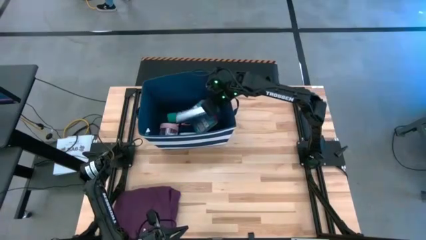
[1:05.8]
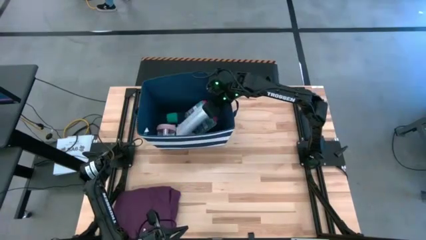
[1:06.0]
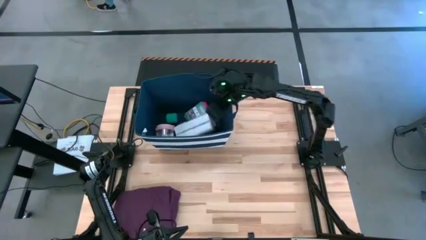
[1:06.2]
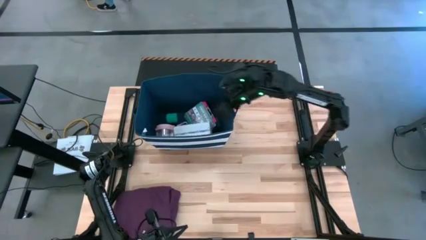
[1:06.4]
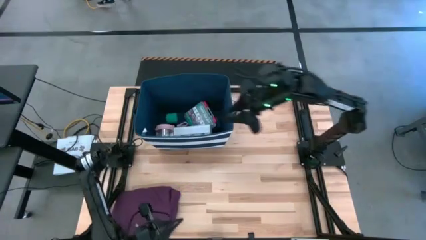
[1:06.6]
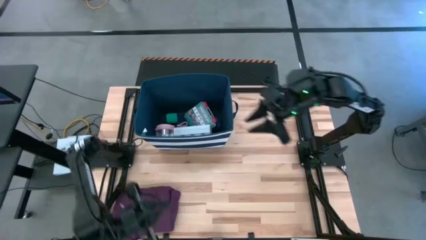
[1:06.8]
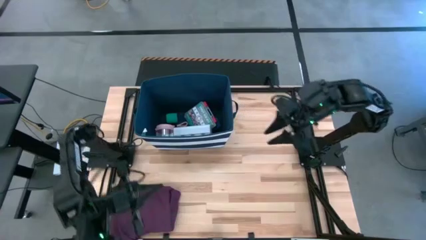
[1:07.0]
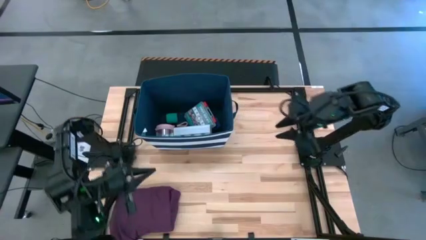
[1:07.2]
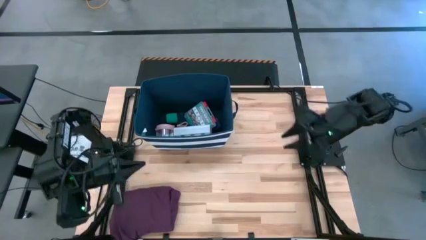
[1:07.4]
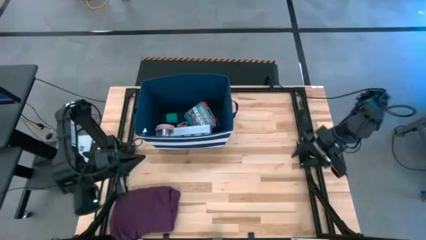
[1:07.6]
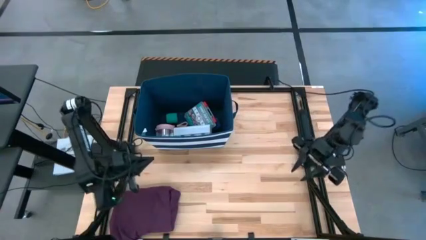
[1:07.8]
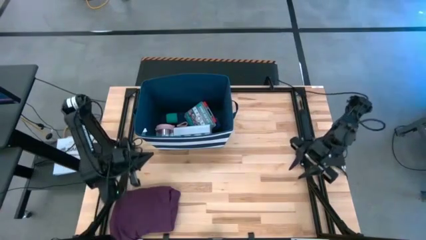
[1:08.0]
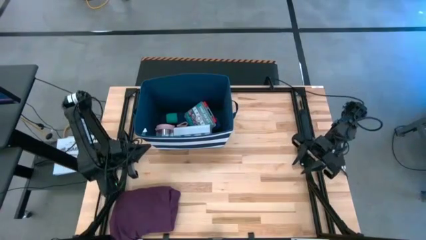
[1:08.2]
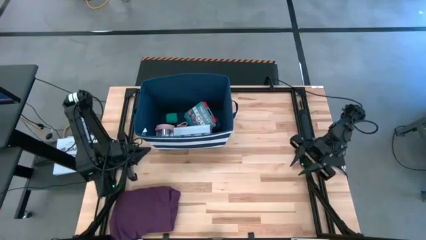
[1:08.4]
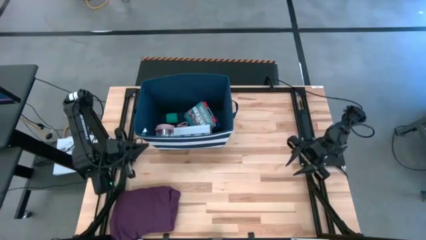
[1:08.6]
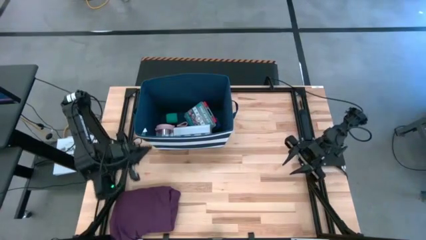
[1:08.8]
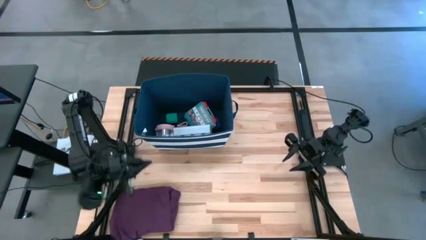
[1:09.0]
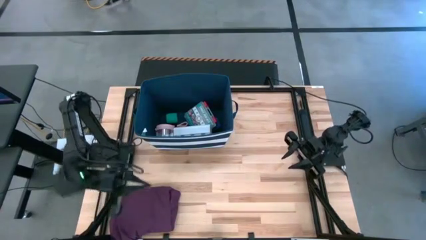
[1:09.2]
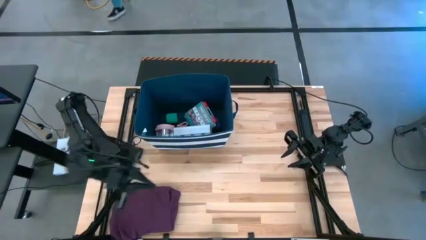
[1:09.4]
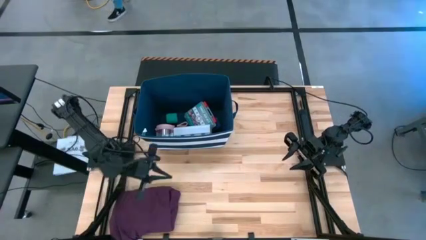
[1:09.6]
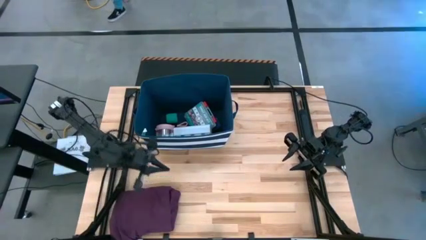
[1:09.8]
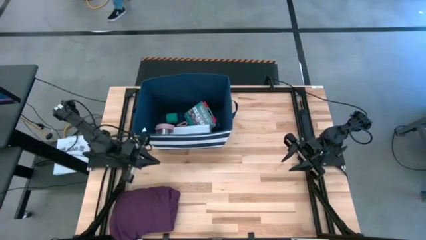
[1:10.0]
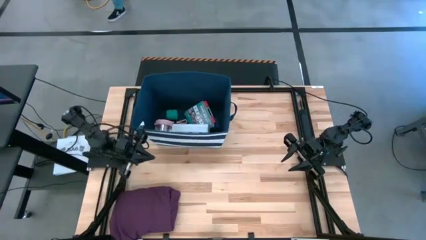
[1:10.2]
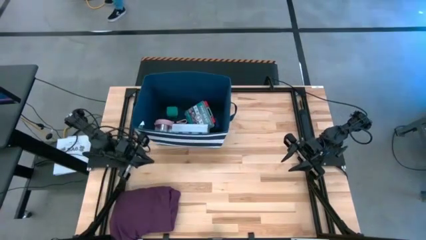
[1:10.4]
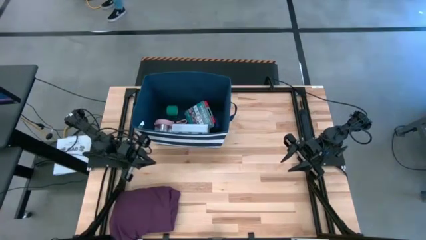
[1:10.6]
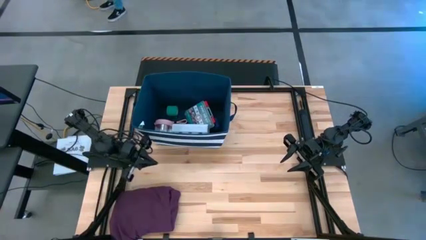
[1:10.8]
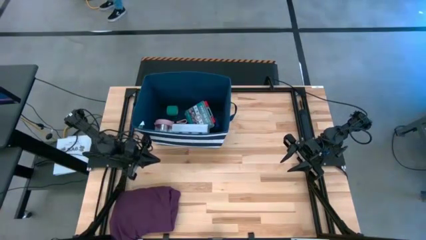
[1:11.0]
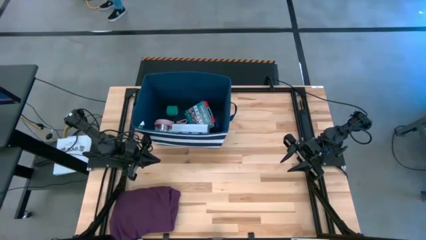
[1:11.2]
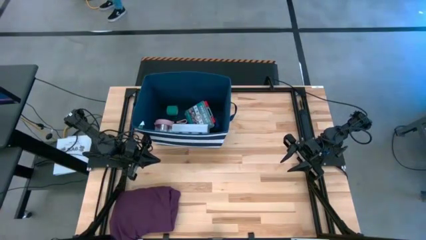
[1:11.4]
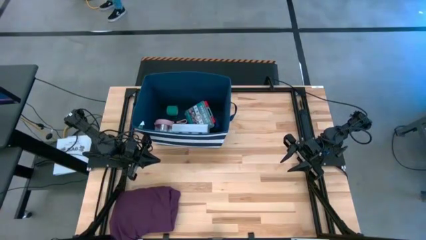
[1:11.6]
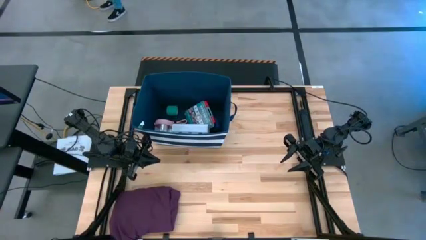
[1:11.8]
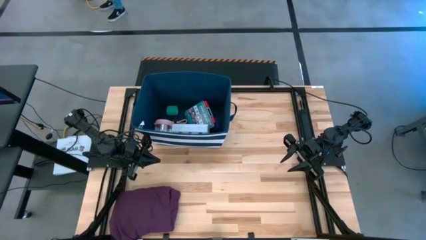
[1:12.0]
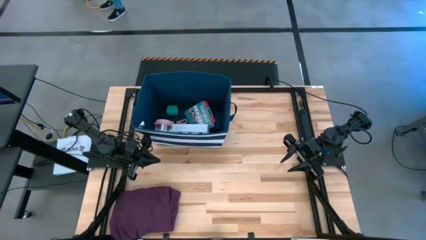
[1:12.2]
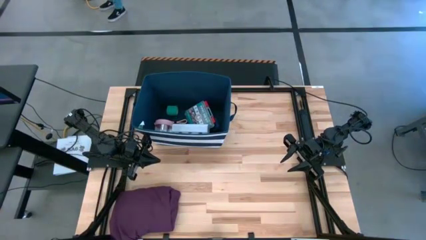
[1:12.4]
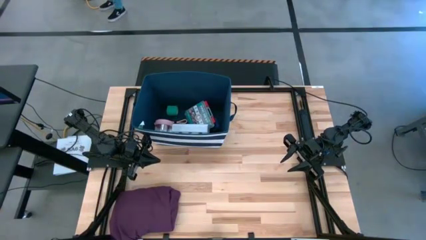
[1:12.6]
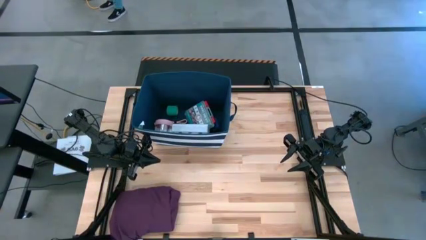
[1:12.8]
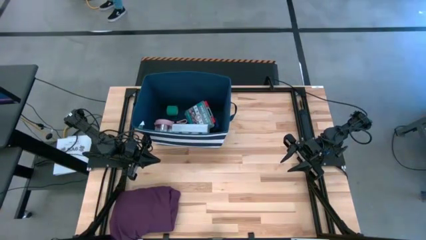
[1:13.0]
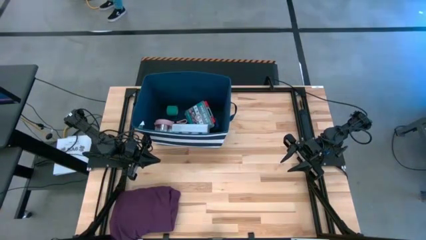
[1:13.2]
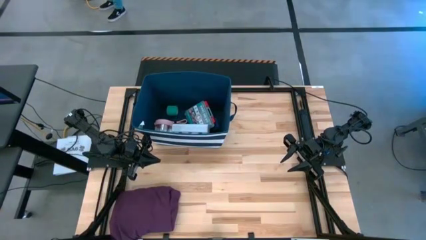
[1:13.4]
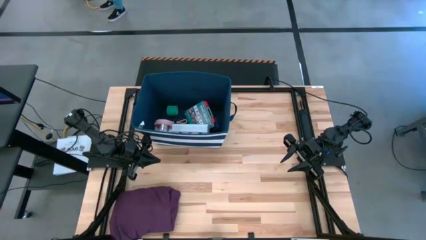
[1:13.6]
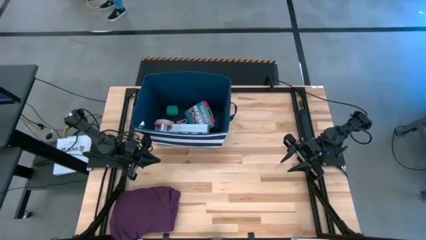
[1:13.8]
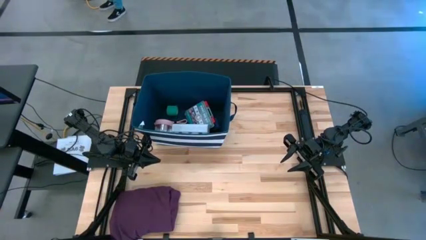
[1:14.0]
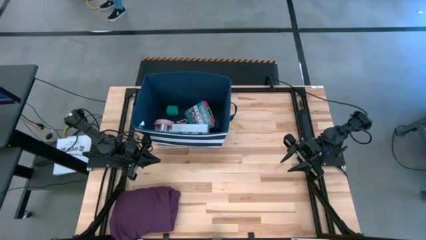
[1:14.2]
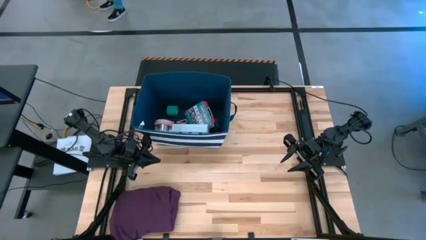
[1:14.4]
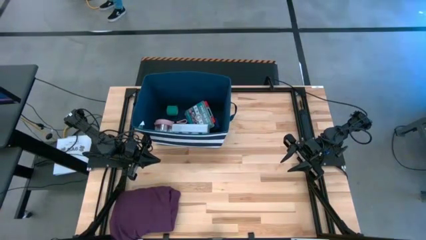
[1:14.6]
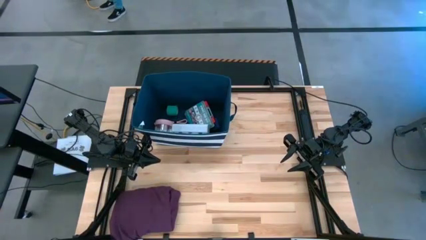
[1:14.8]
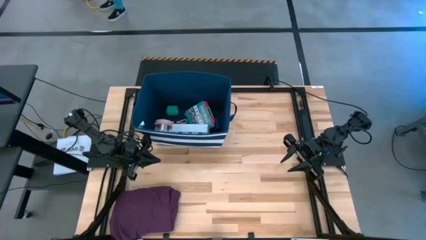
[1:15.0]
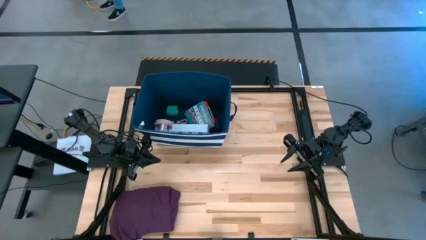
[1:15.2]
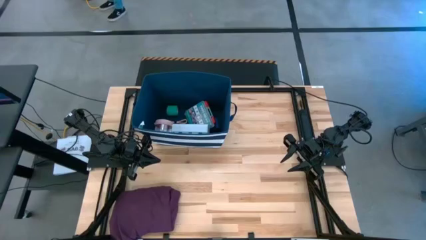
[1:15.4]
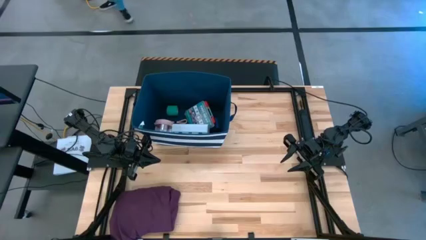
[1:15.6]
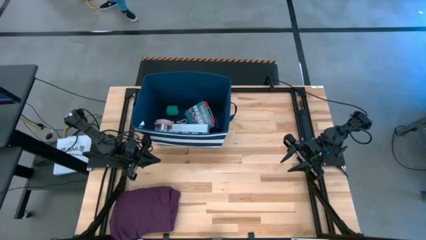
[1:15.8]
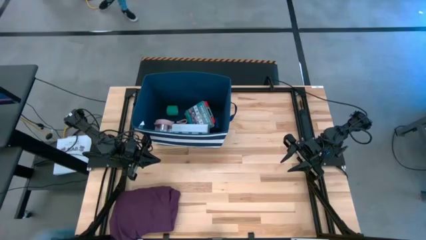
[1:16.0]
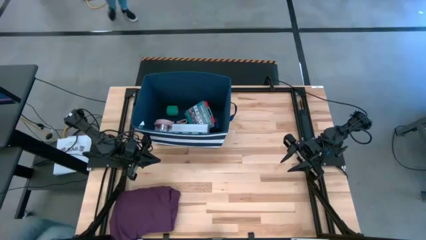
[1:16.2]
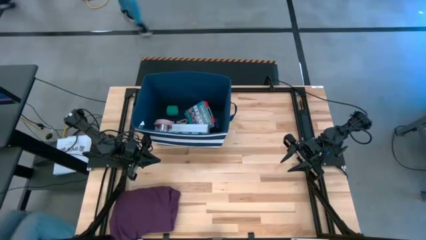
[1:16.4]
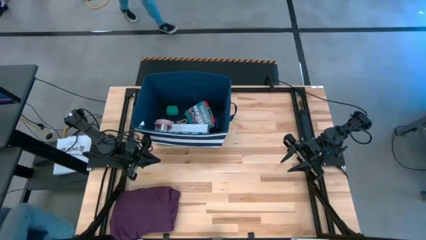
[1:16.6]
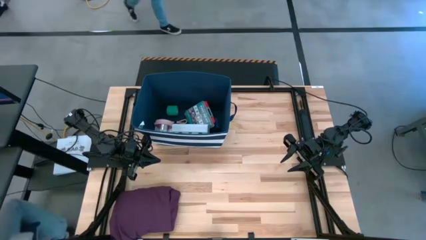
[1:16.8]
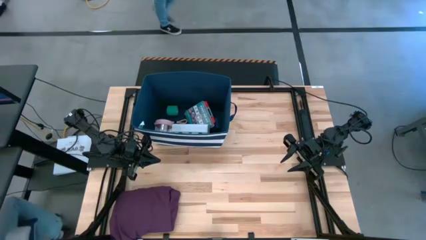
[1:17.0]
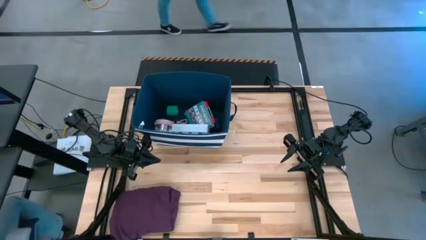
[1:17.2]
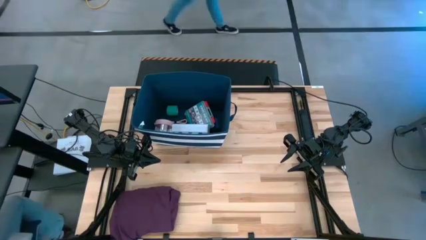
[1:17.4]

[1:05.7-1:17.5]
Task: Pick & place medical supplies in basket/bin
Return to Home Position

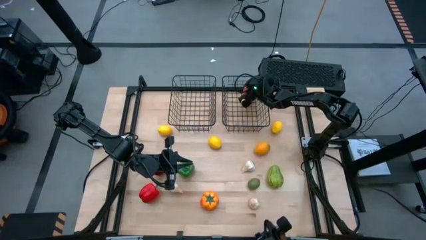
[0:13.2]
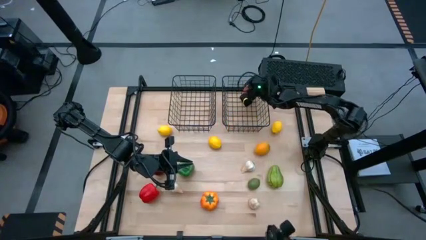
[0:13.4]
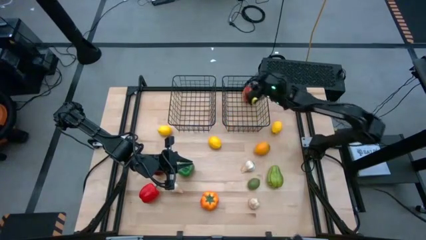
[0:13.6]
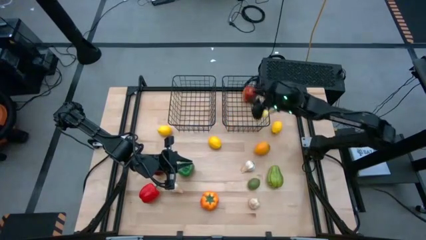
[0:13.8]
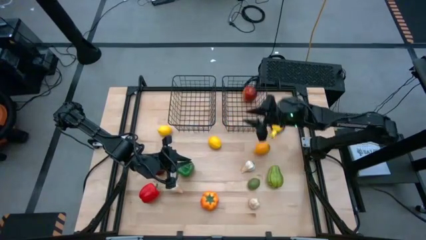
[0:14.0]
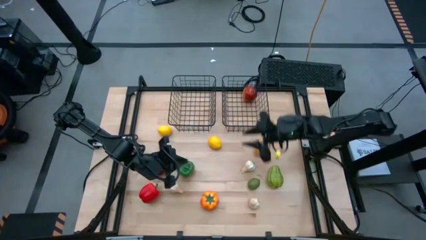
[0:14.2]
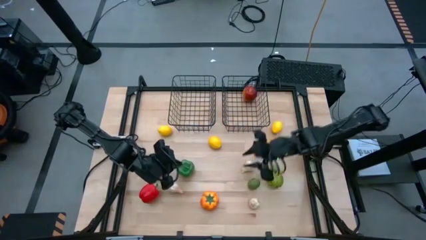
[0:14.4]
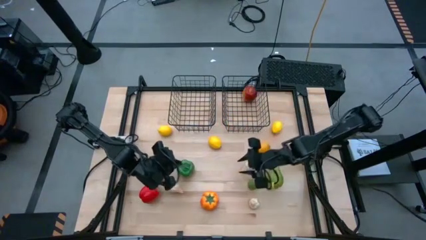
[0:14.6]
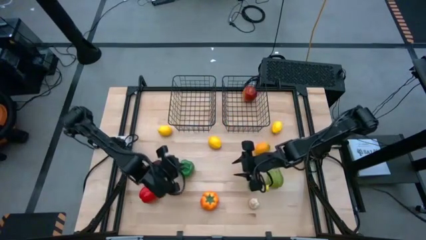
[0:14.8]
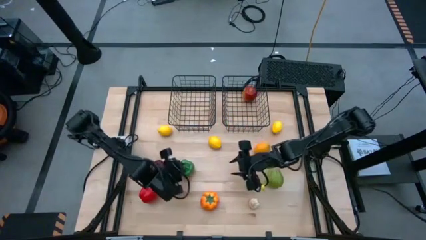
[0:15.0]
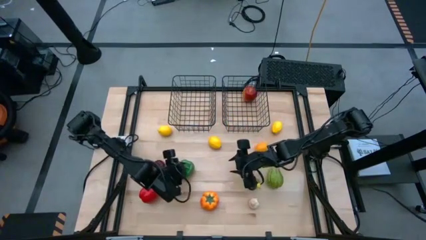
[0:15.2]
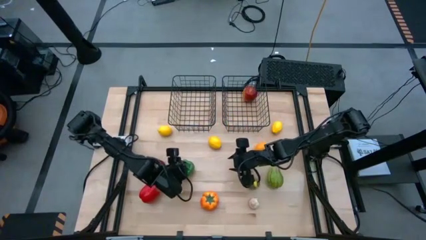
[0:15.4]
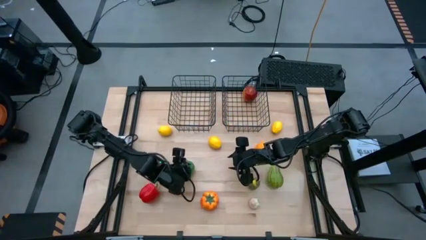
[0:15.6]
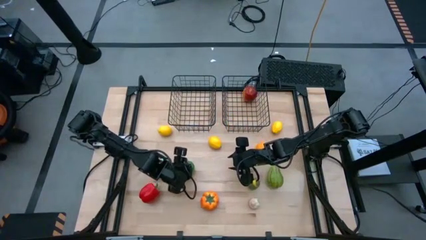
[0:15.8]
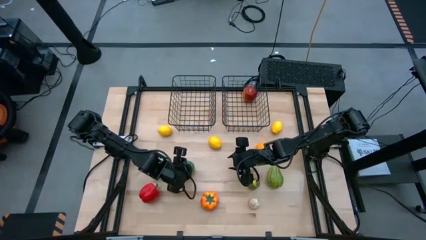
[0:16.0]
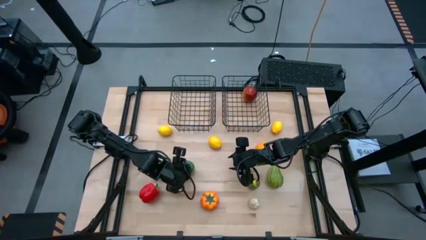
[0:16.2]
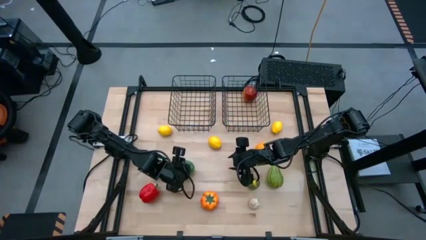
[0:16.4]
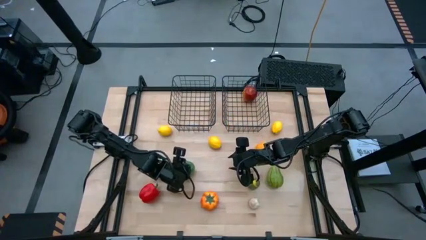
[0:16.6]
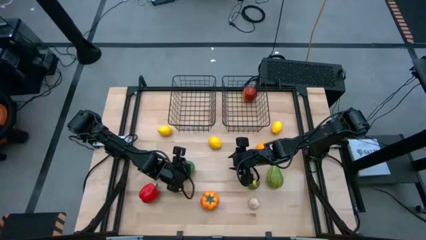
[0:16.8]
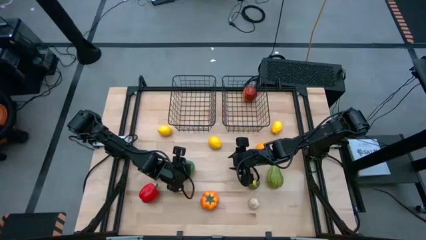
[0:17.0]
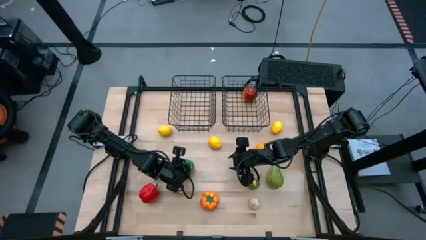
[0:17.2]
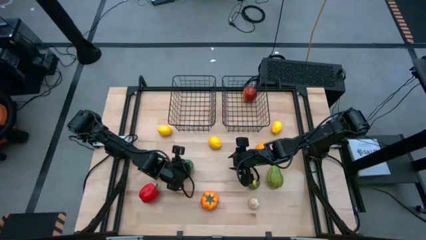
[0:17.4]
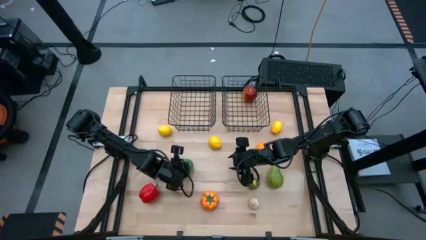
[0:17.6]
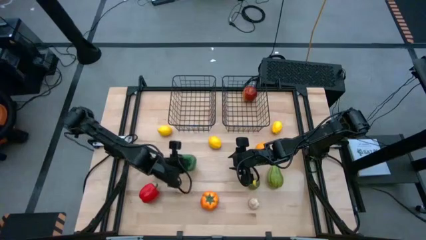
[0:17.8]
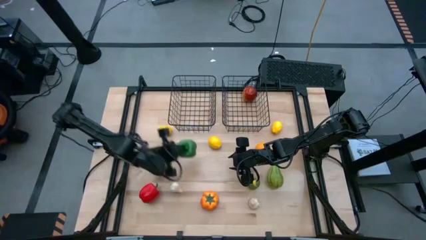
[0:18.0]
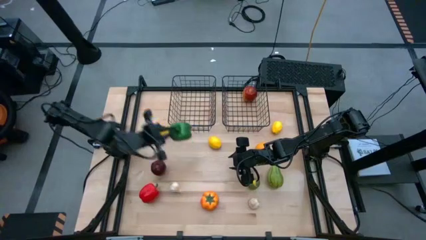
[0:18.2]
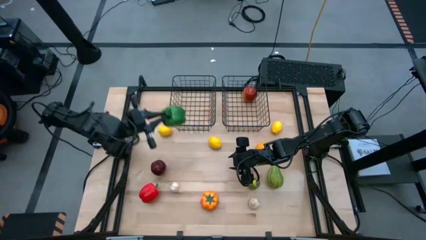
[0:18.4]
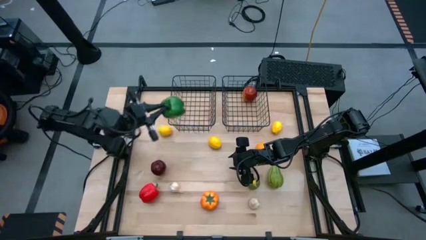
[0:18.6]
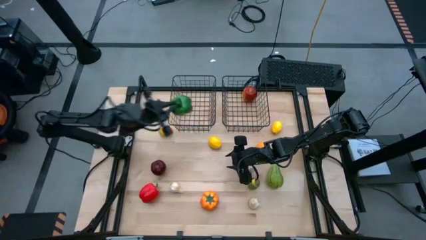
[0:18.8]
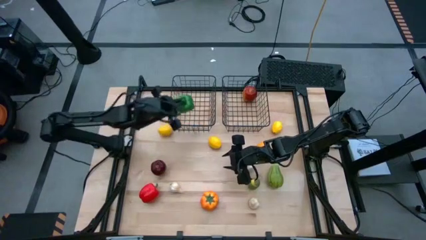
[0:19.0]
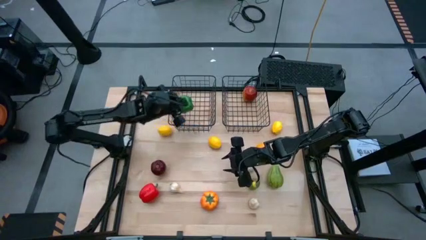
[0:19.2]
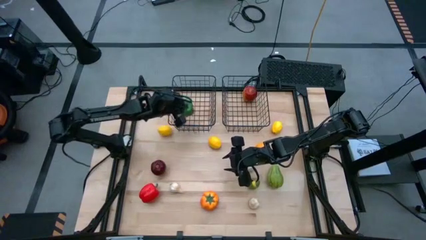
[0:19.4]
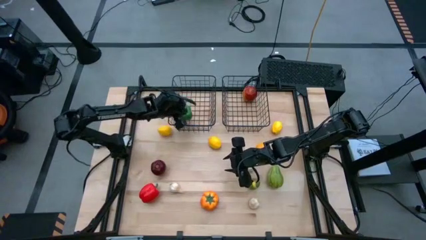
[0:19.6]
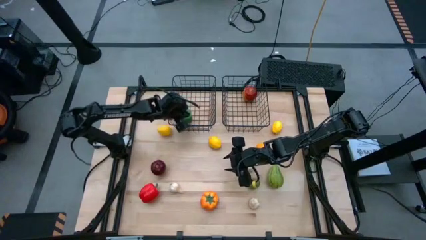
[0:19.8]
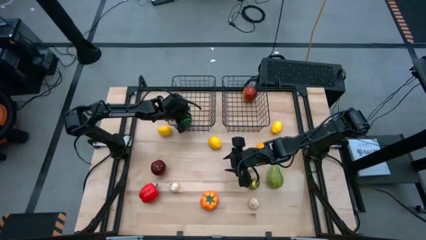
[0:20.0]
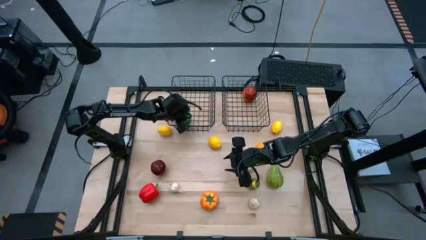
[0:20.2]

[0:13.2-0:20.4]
Task: Sort produce into baskets
Put the green bell pepper into the left wire basket
